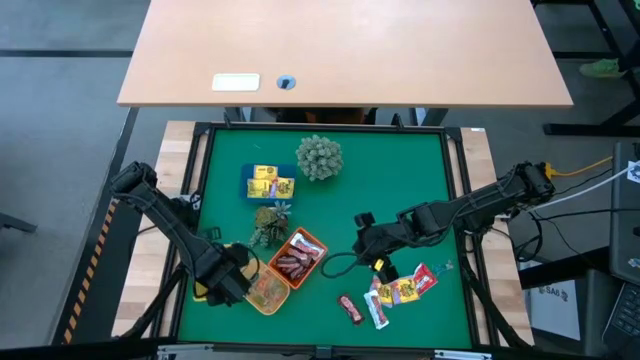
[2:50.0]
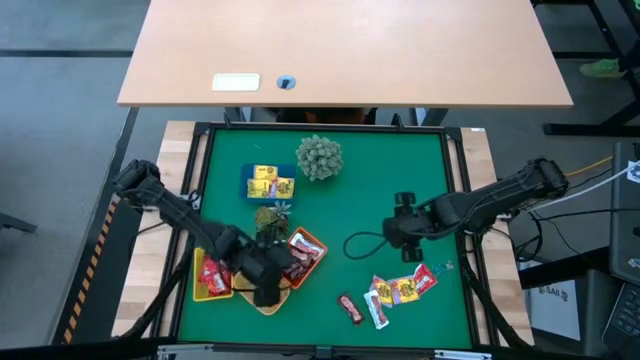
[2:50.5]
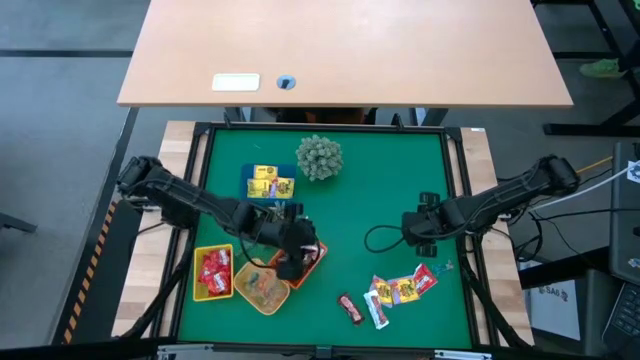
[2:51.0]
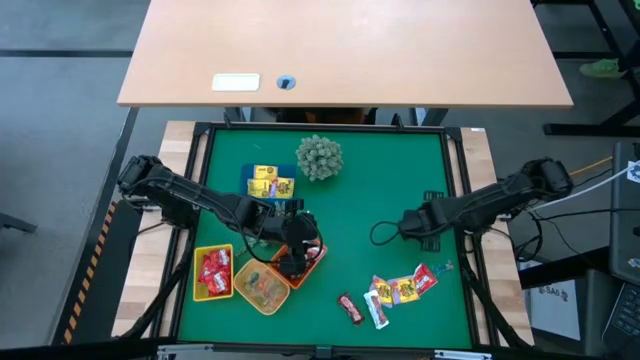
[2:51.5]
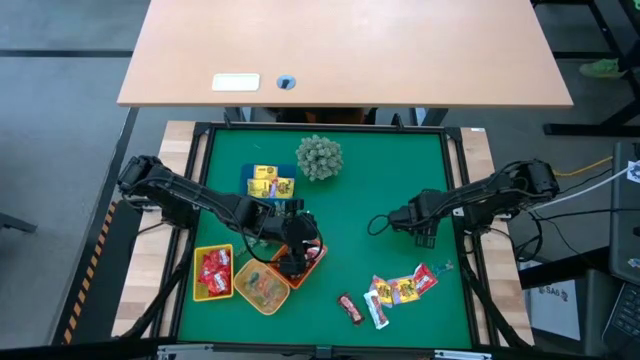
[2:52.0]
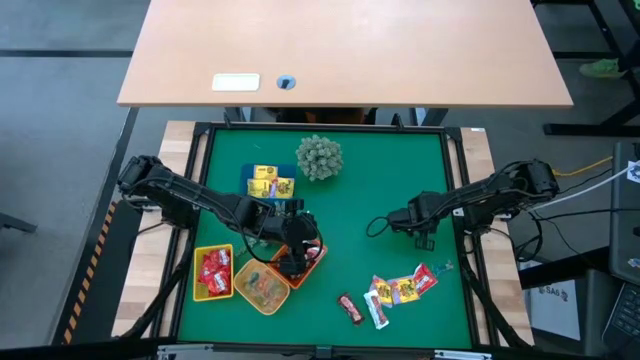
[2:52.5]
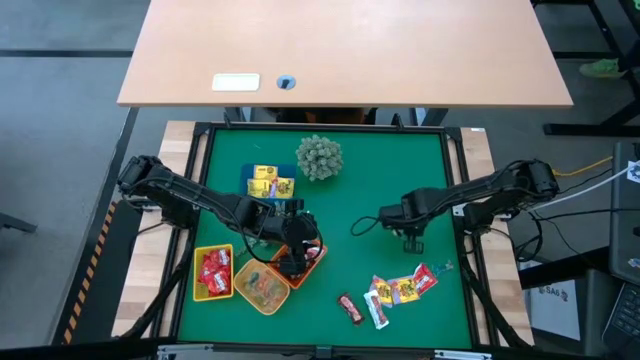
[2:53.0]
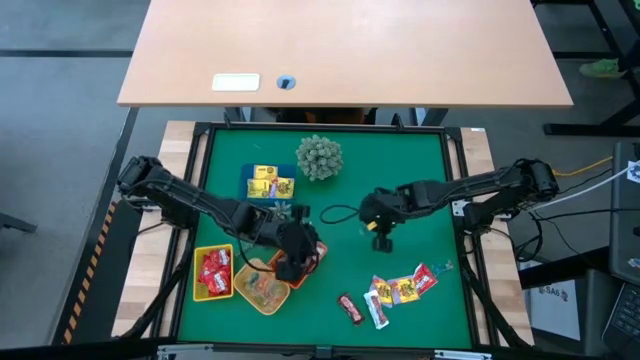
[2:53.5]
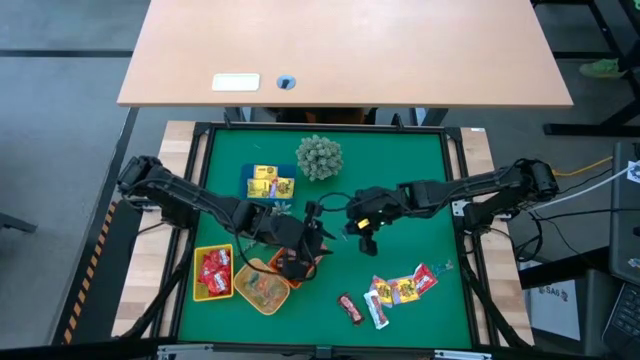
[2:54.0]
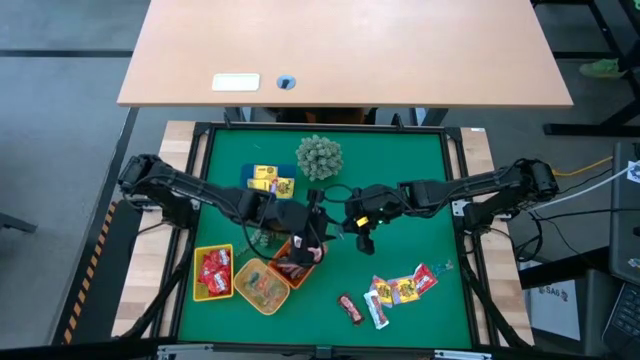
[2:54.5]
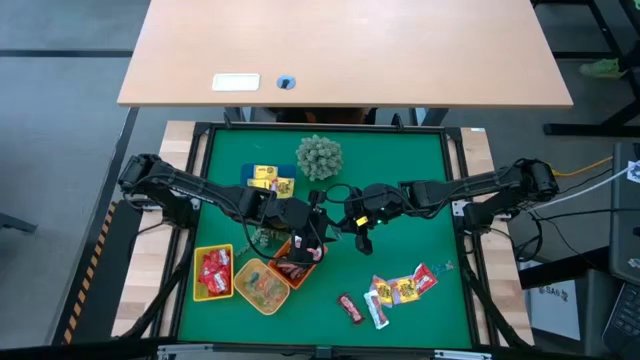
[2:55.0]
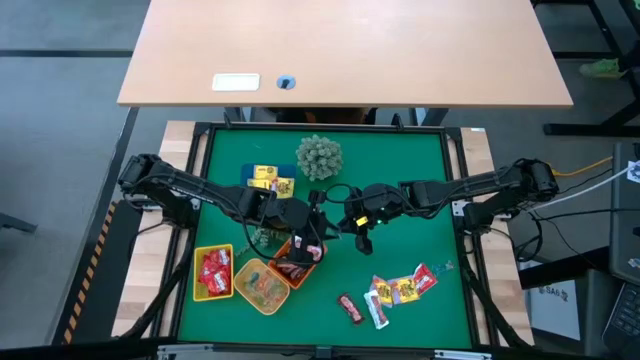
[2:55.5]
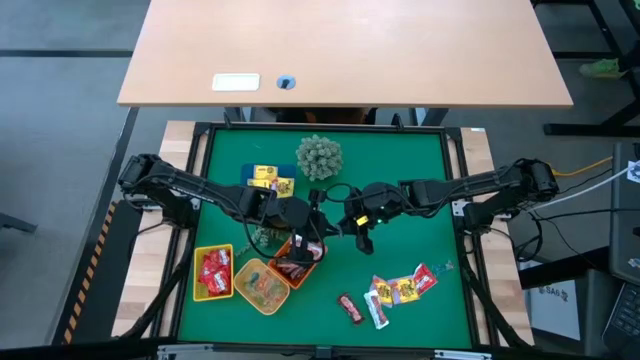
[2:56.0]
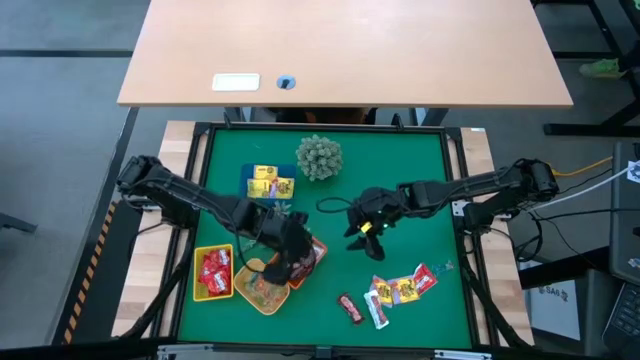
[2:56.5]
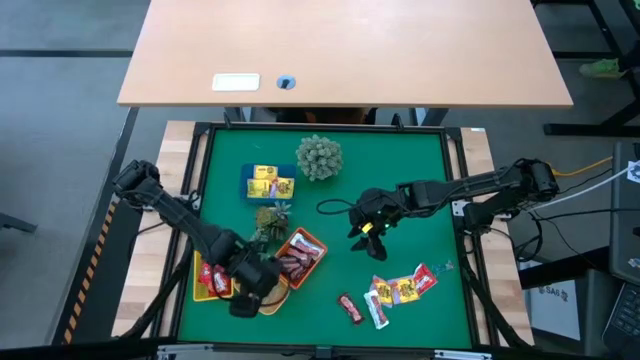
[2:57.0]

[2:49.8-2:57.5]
Task: Sort candy
Put the blue gummy into the light orange bin

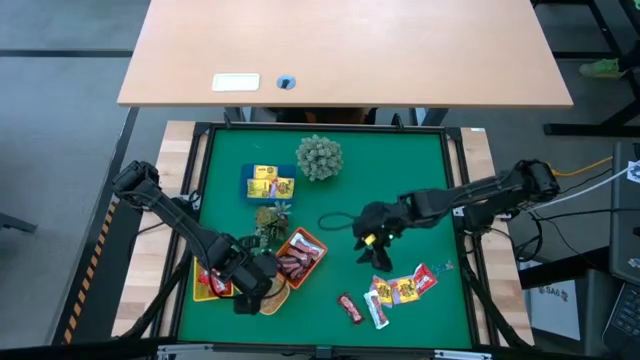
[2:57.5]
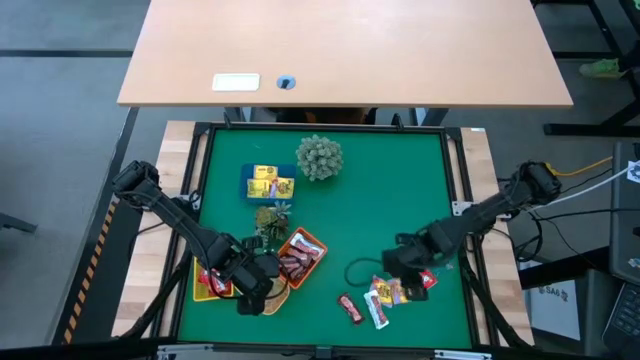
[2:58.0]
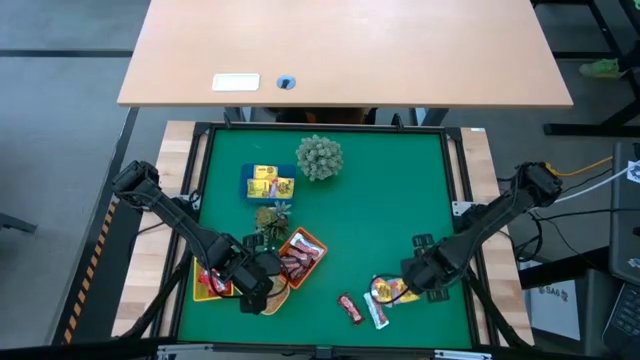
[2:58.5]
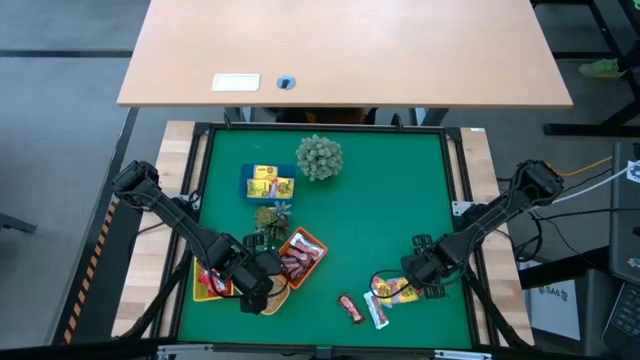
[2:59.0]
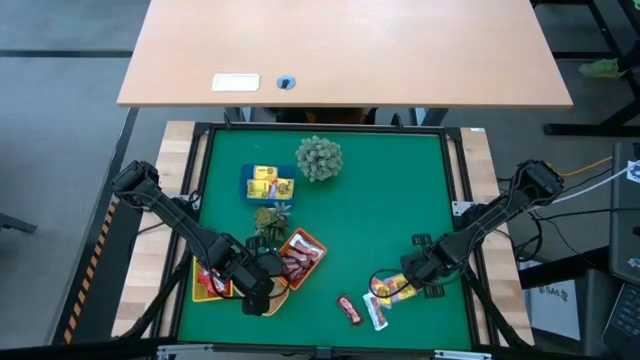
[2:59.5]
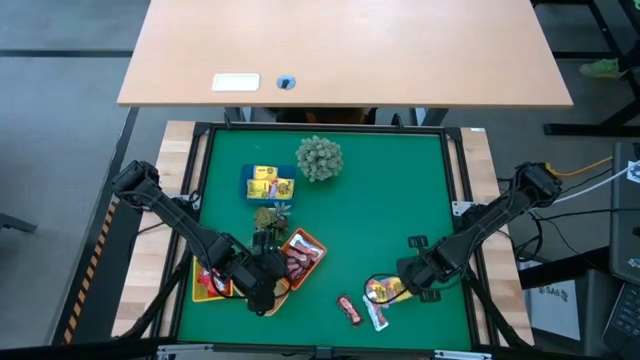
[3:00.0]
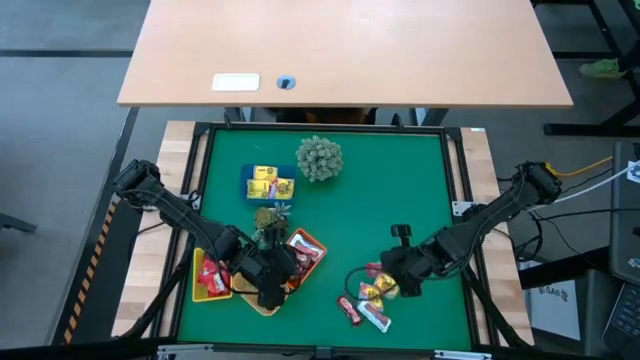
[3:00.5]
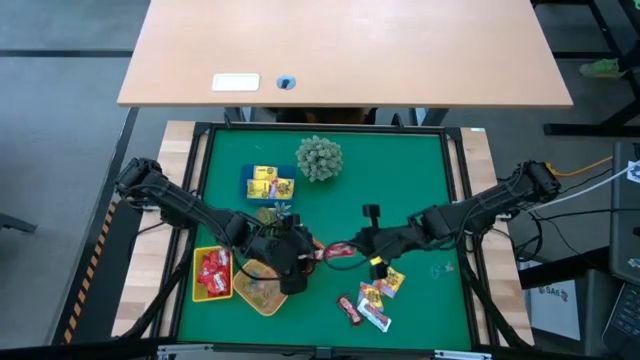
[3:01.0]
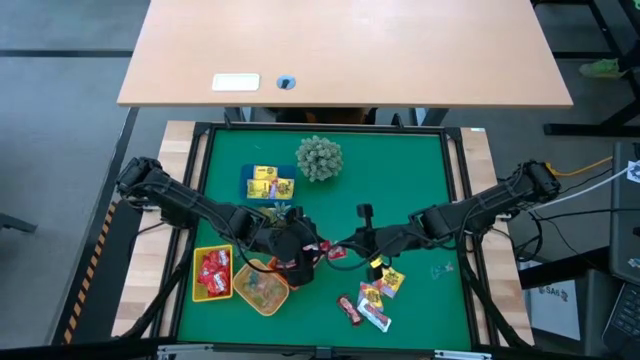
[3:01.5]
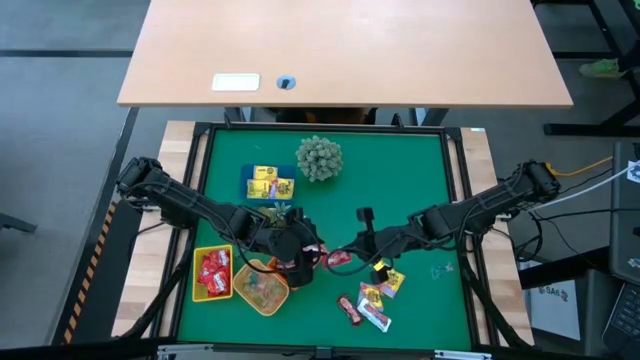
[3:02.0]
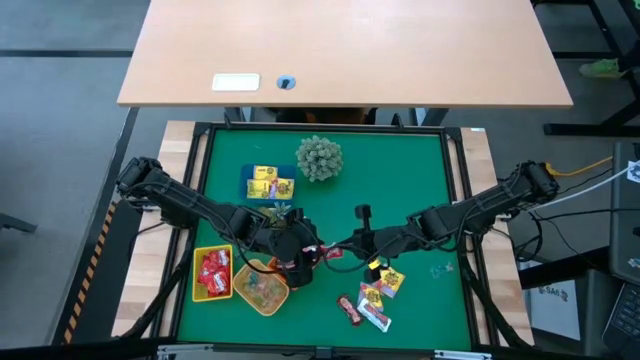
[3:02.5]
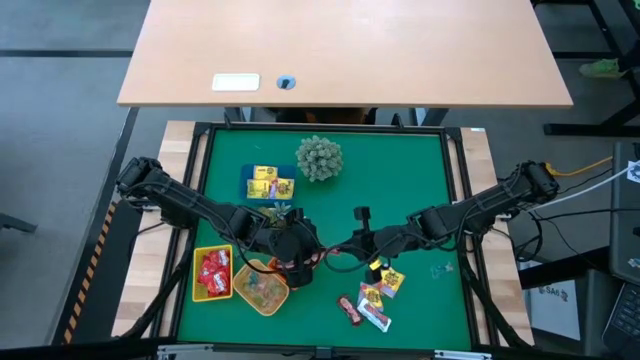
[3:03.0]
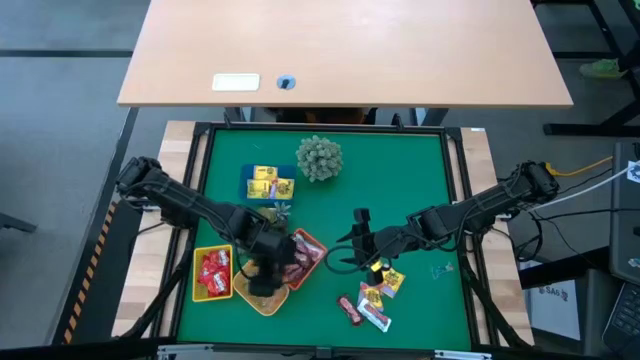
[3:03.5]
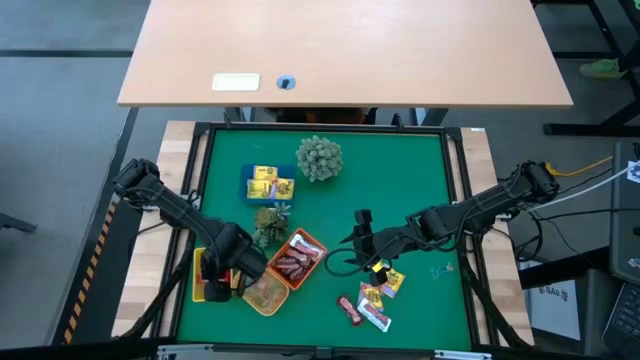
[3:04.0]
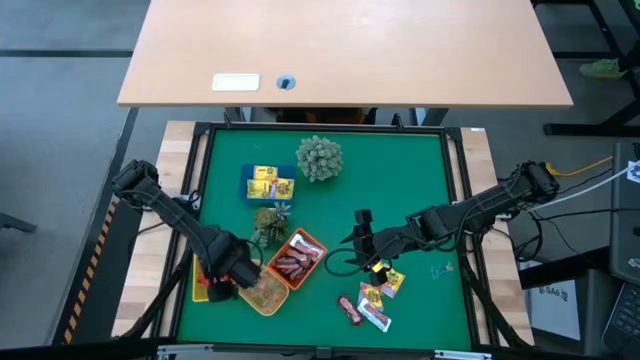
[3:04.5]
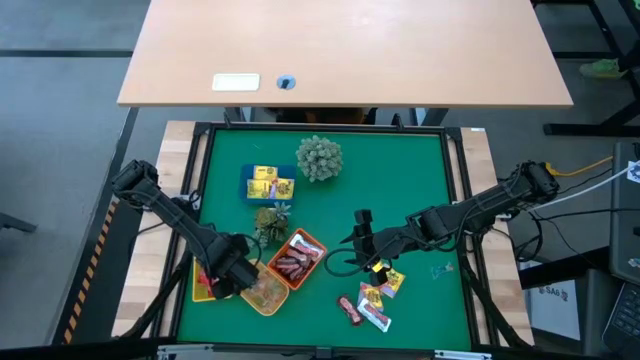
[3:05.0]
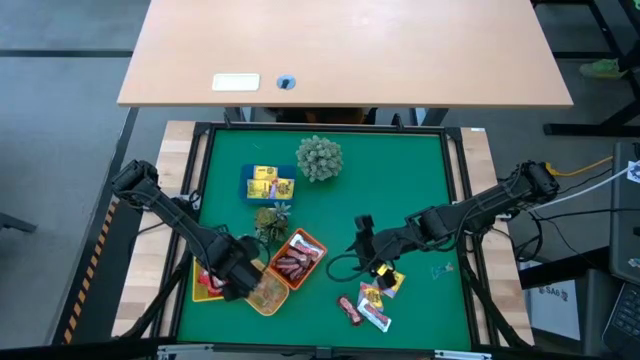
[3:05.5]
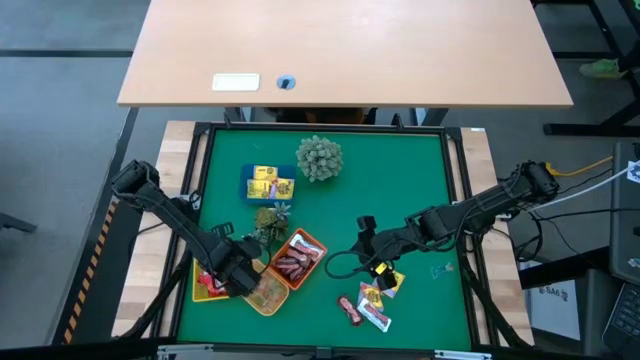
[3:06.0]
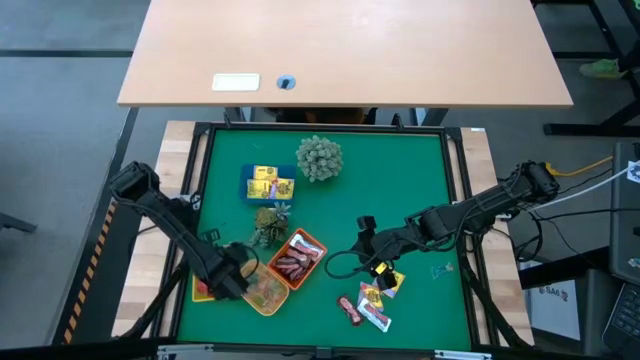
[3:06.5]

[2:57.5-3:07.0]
Put the red candy into the yellow bin

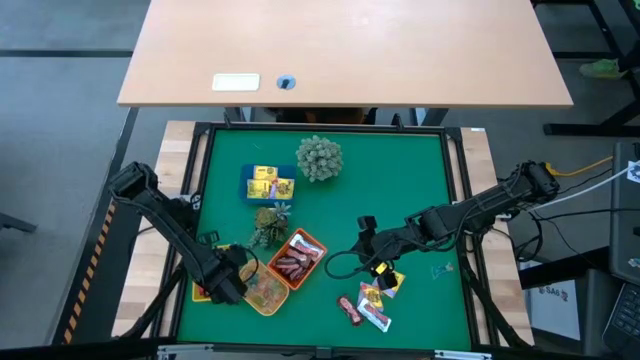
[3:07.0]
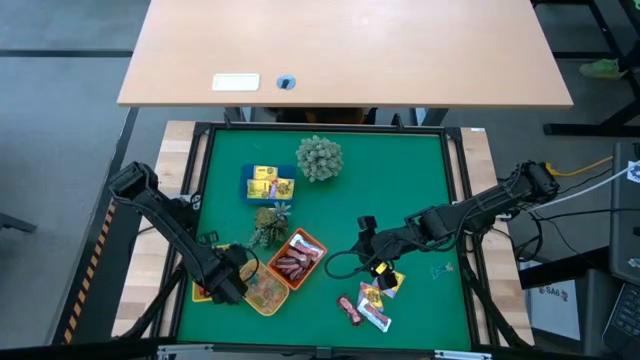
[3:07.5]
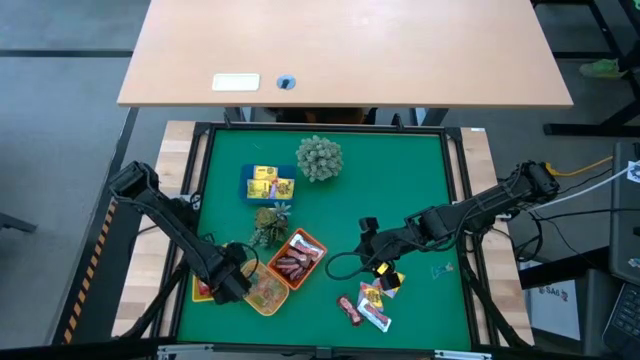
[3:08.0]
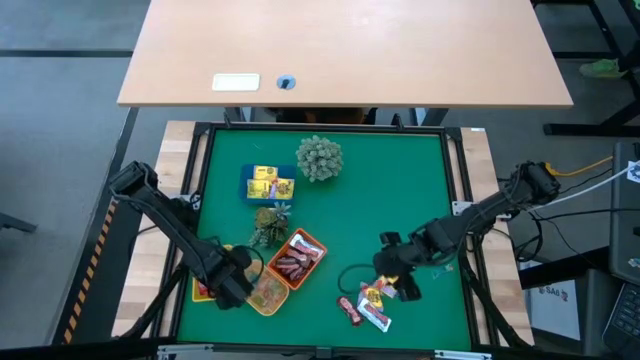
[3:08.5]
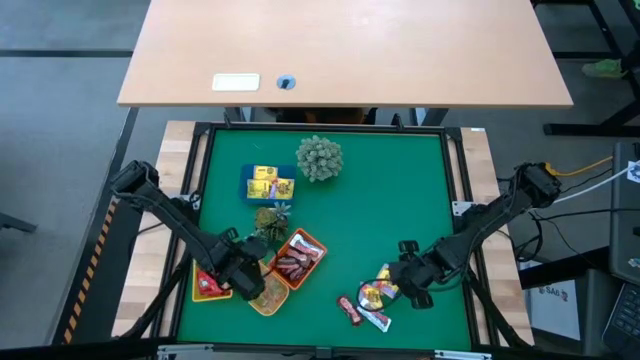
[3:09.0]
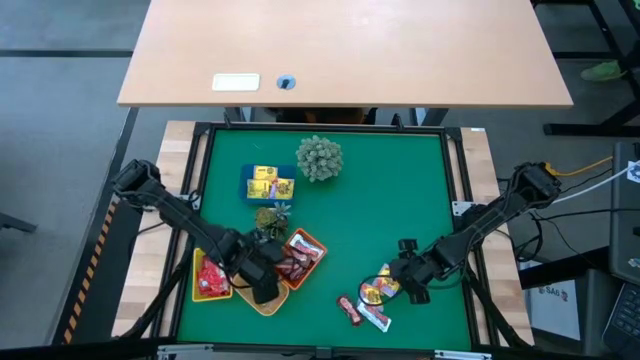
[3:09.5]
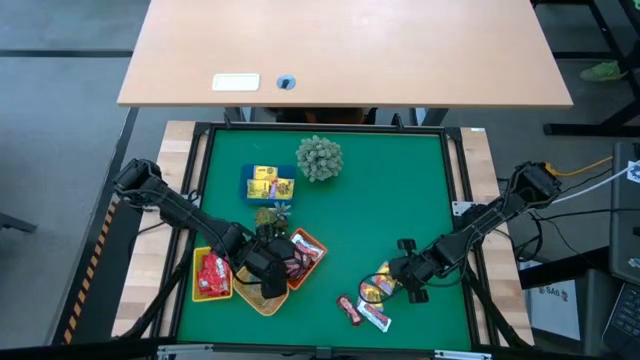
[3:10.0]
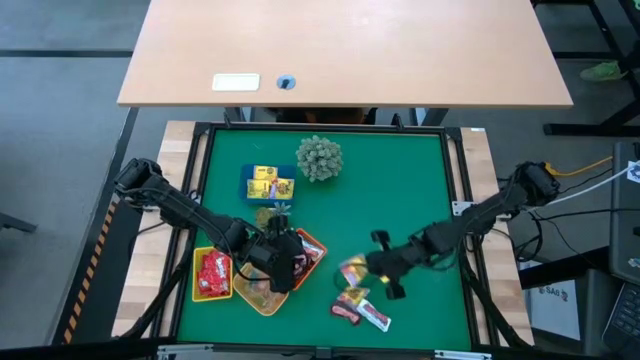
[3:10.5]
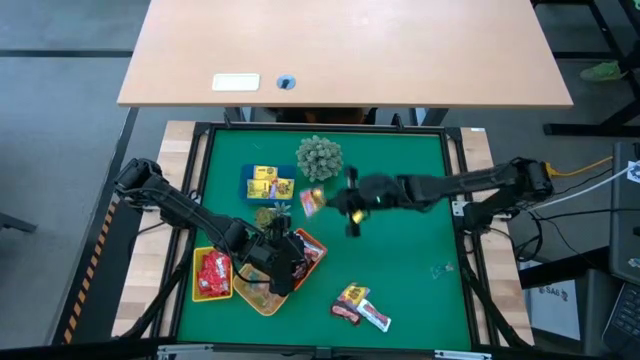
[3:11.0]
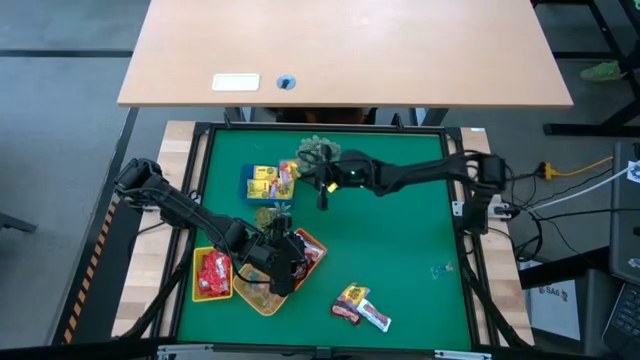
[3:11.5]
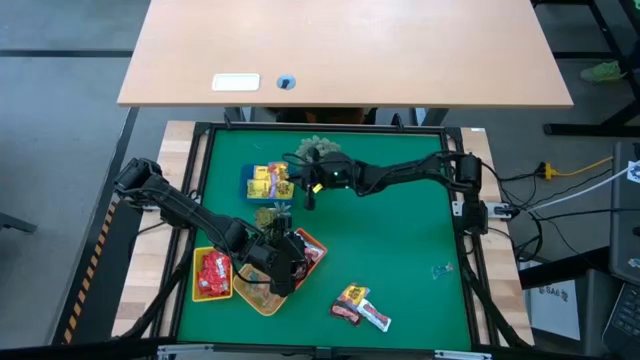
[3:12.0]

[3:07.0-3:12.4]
Put the yellow candy into the blue bin
